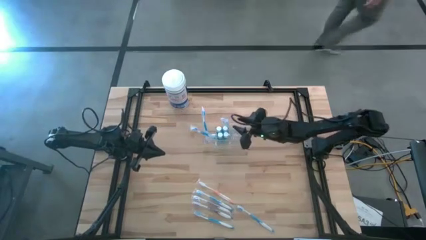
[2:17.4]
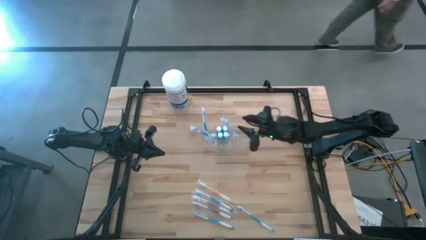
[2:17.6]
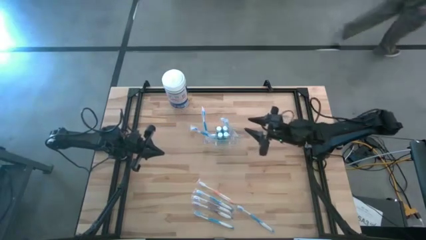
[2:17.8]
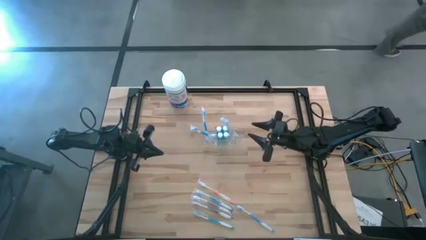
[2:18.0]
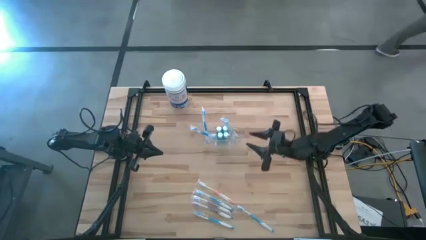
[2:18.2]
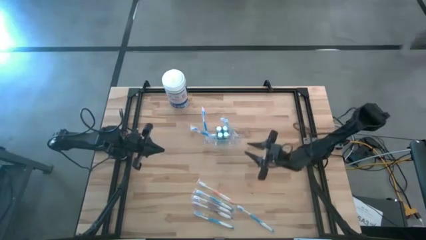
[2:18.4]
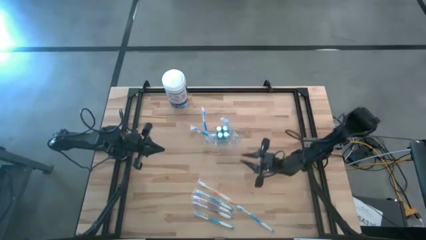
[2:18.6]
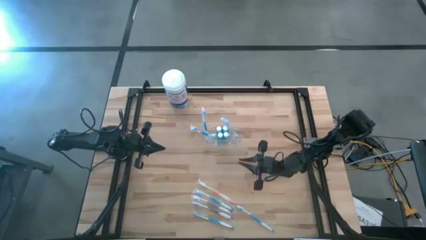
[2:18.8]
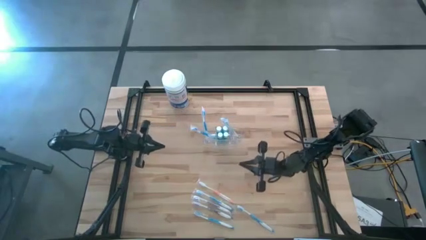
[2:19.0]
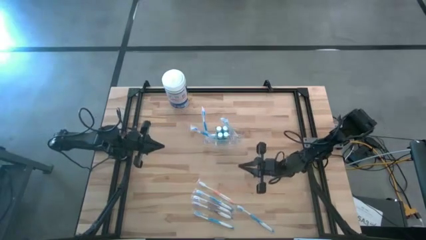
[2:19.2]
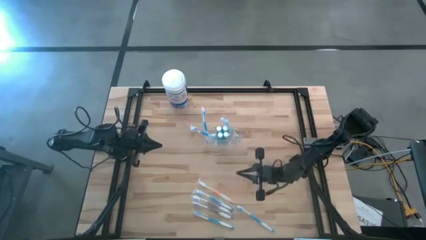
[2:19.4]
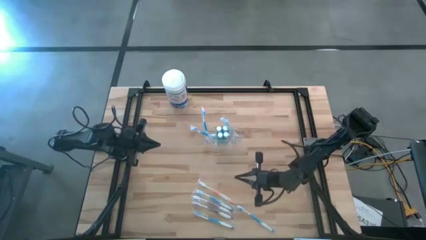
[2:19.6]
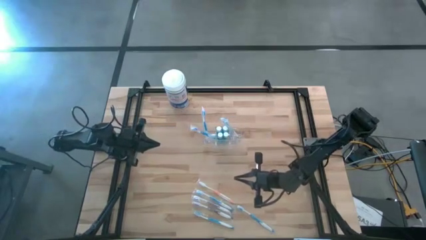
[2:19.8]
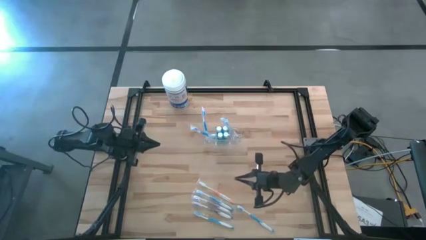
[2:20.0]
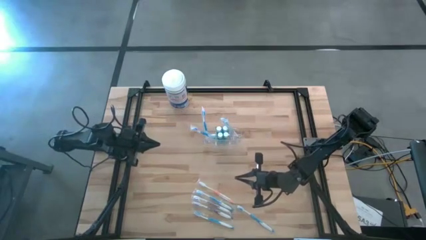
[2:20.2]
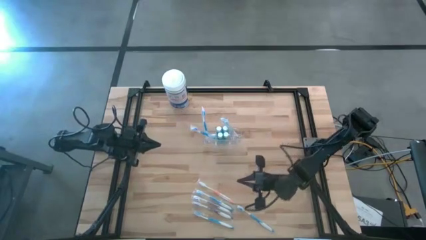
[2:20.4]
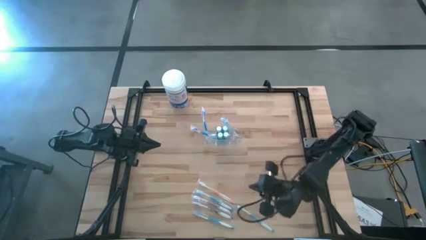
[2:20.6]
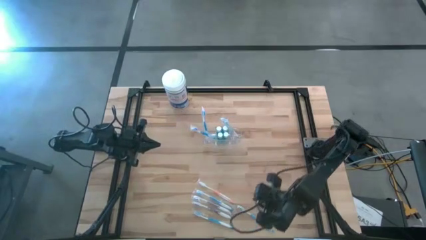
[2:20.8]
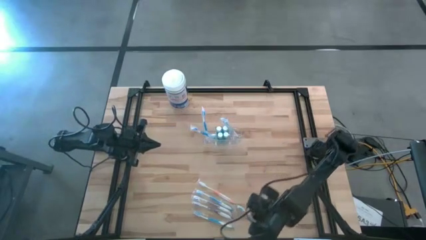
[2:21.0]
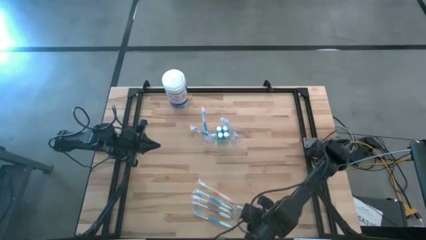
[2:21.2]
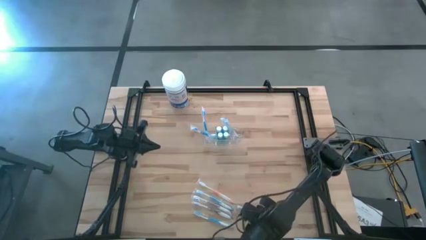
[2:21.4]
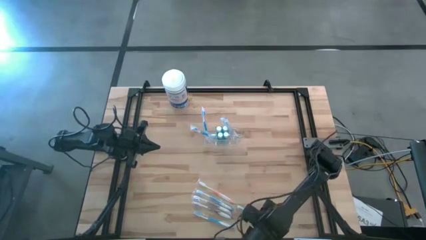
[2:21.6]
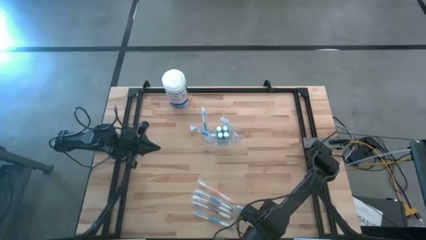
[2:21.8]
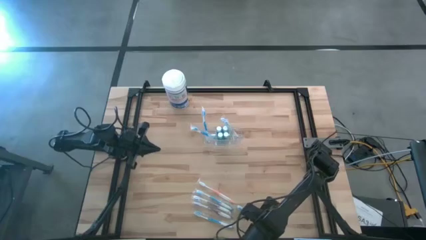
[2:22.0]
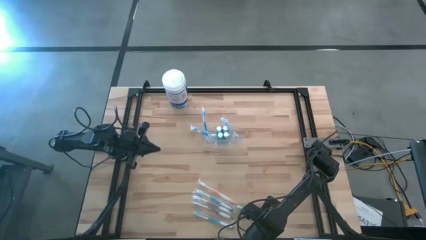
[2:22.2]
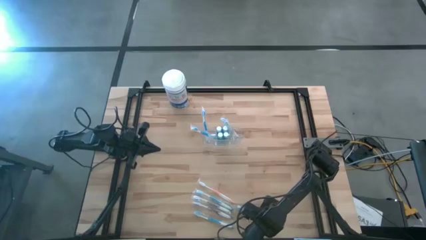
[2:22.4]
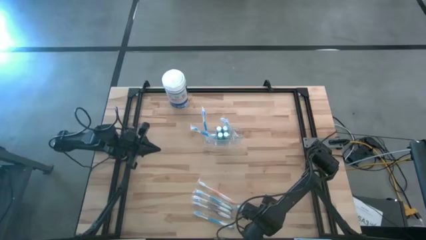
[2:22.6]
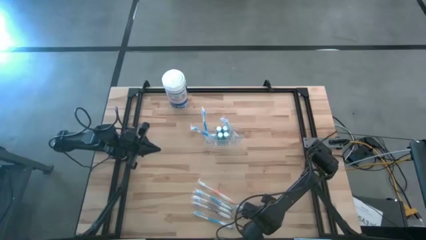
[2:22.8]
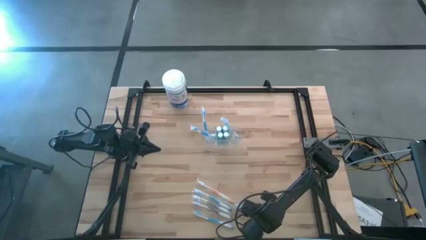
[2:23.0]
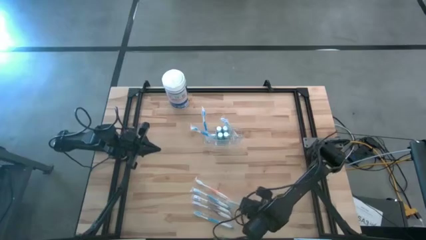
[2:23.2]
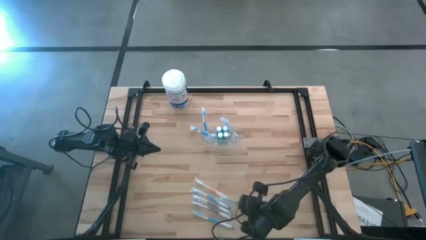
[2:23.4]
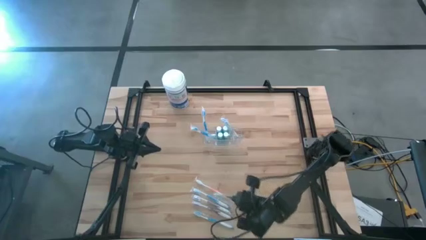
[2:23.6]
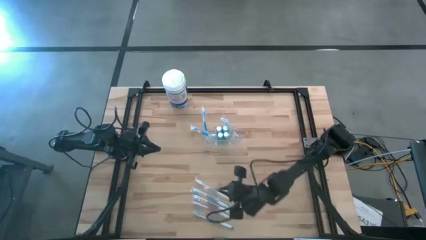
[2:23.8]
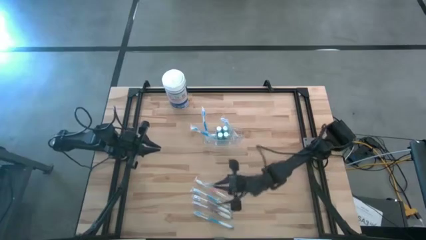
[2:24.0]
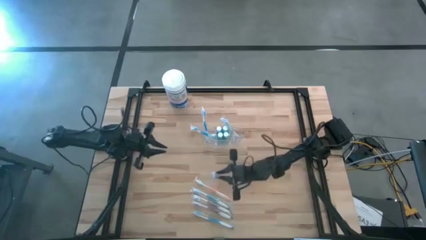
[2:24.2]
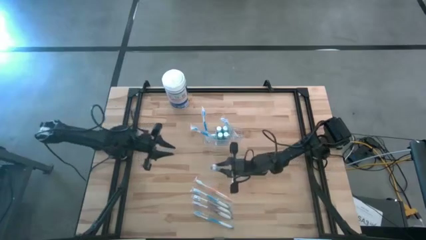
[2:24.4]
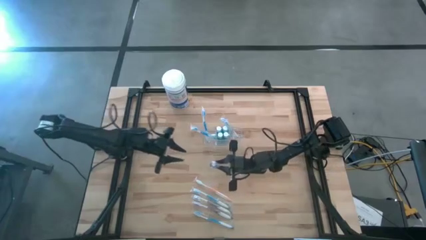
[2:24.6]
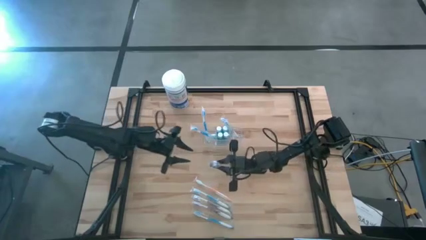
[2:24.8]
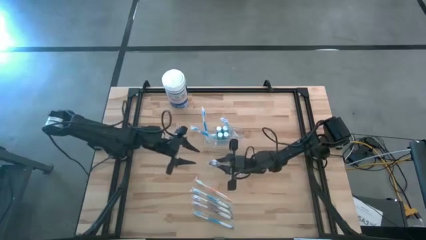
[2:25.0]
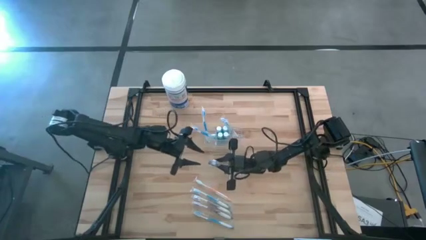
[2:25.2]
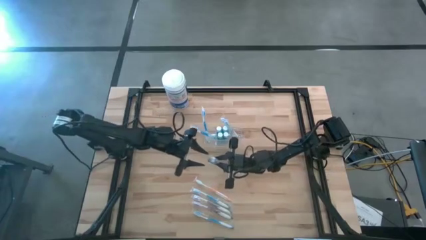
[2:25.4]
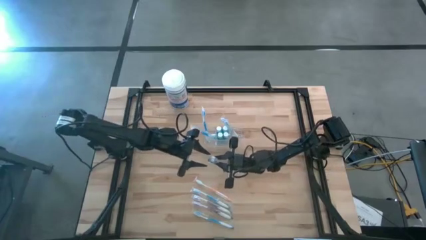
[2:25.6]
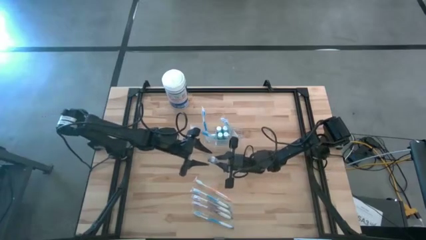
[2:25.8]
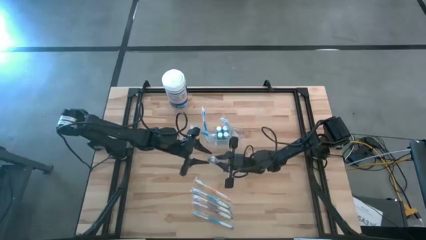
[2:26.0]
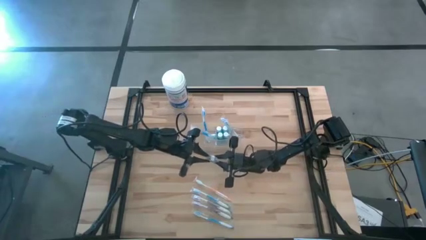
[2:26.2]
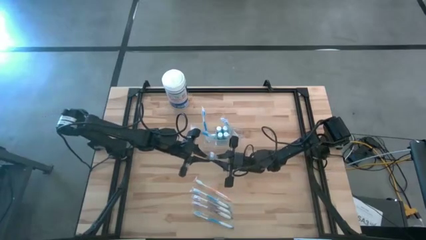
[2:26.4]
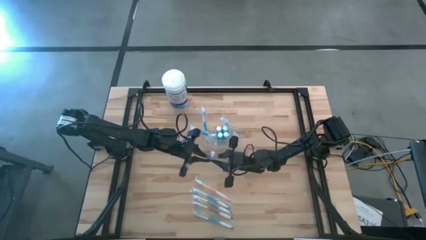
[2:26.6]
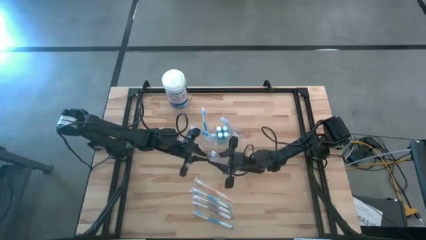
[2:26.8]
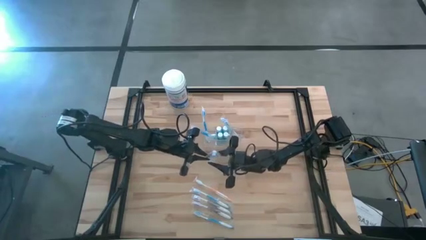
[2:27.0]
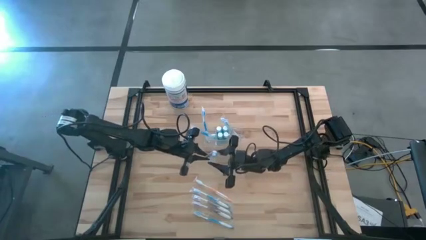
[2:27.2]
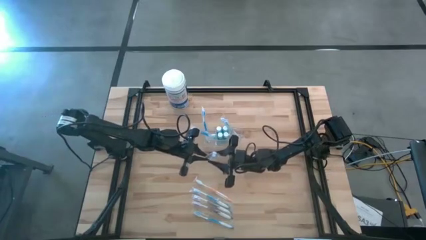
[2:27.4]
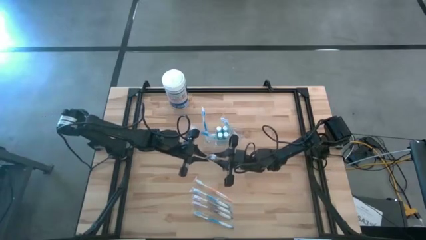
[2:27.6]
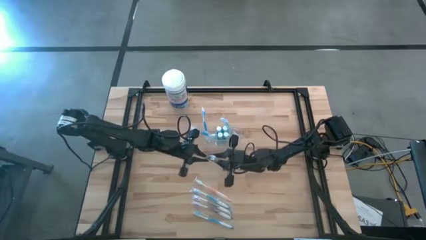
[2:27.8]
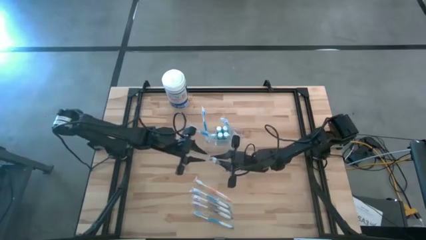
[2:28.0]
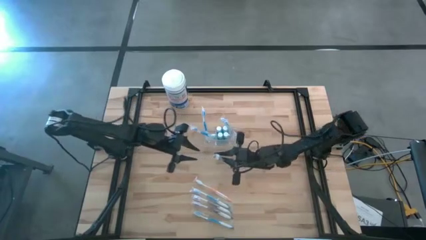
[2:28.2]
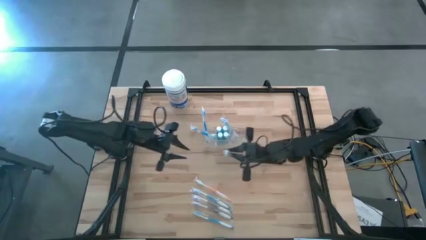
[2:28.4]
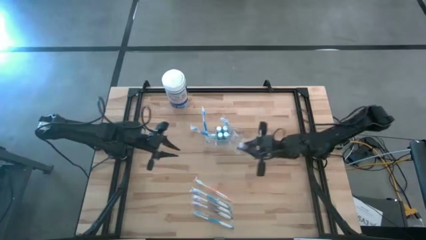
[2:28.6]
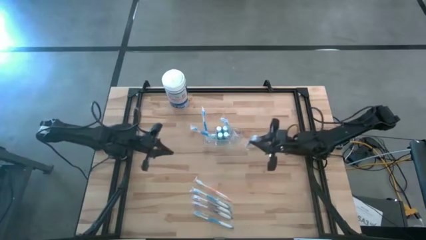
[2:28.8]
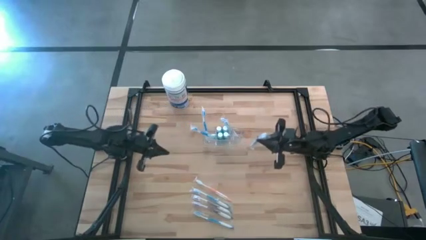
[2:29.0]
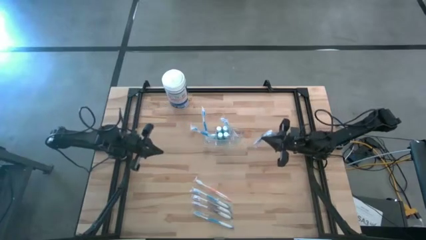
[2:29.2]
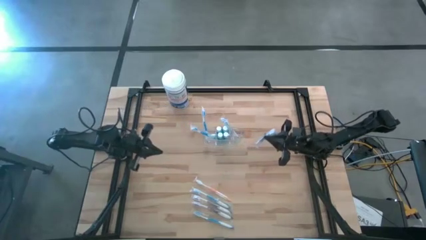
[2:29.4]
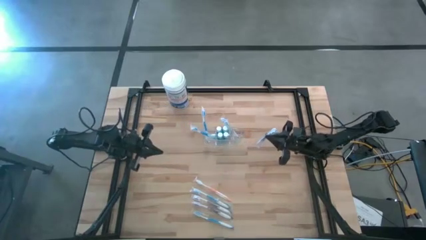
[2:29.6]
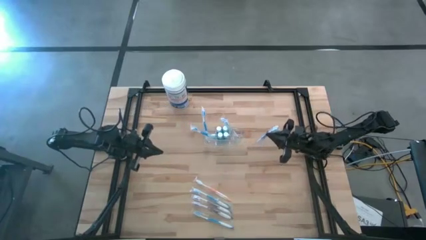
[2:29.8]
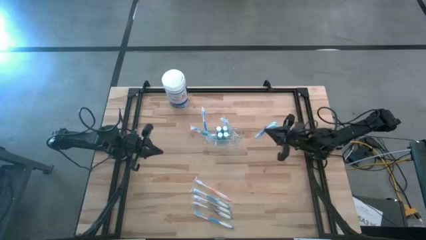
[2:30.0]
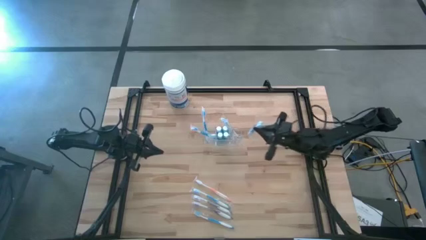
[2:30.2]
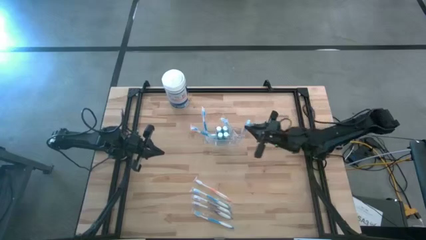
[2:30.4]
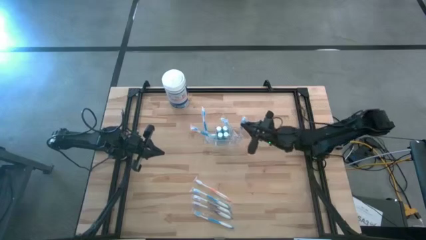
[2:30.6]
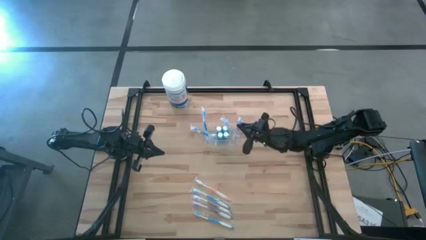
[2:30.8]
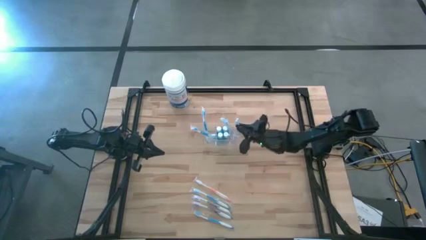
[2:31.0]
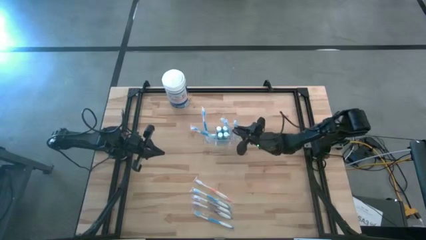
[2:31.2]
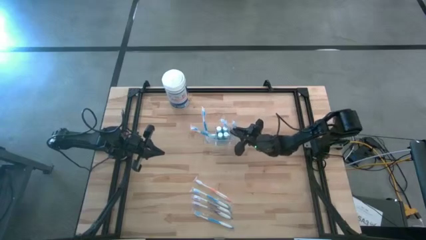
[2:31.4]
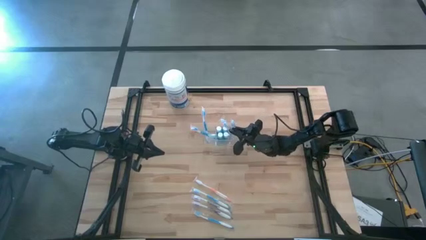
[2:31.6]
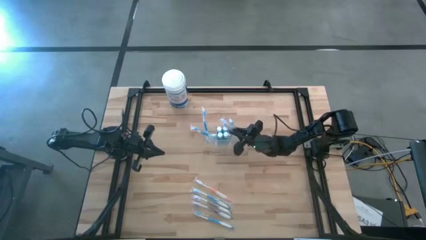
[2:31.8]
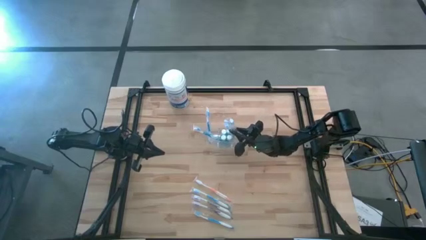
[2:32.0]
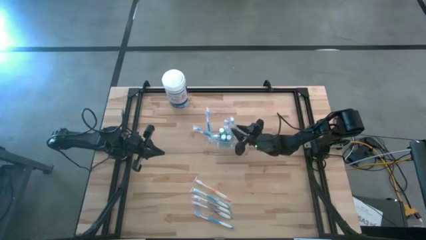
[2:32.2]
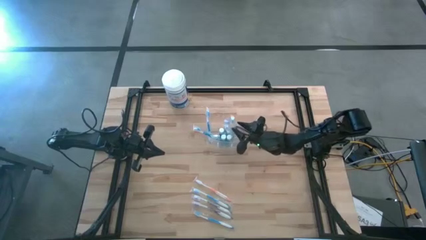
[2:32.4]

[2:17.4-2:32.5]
Task: Pick & Place toothbrushing station
Put the blue toothbrush in the transparent organizer
